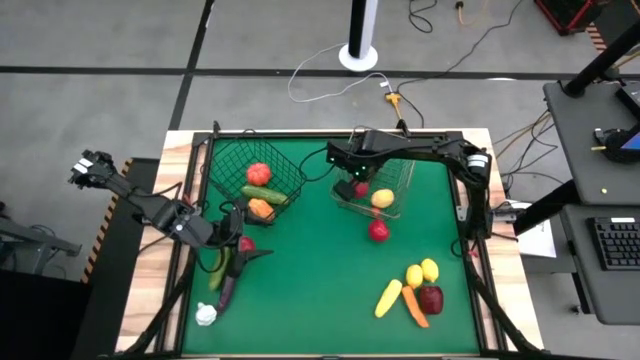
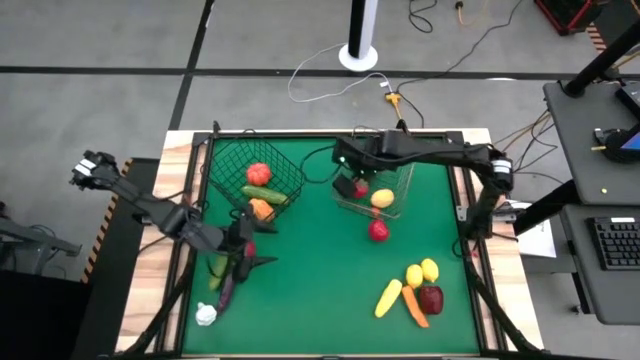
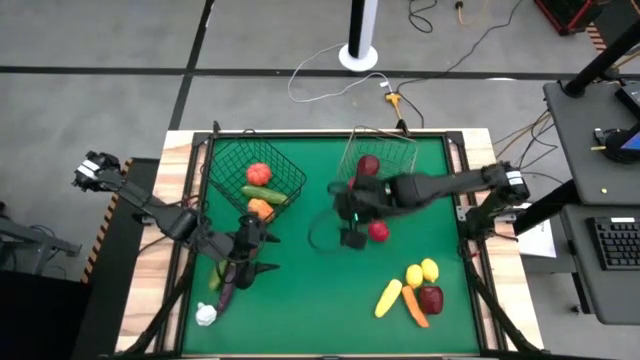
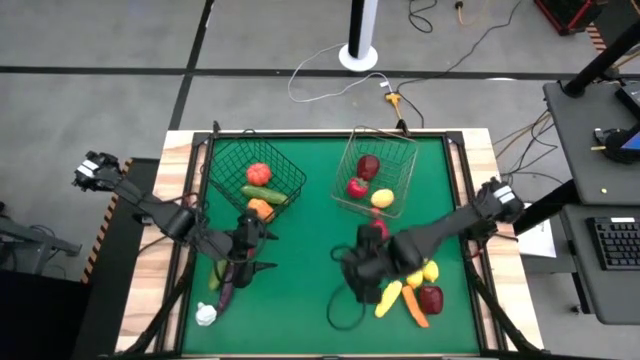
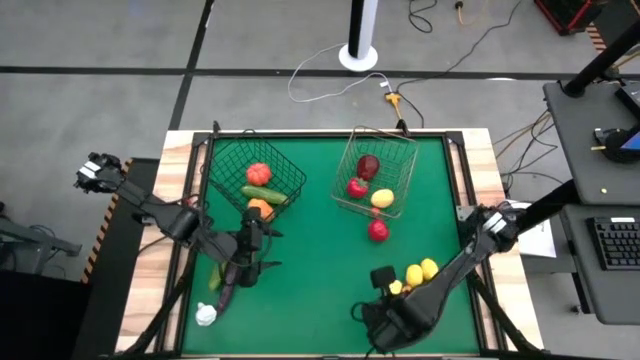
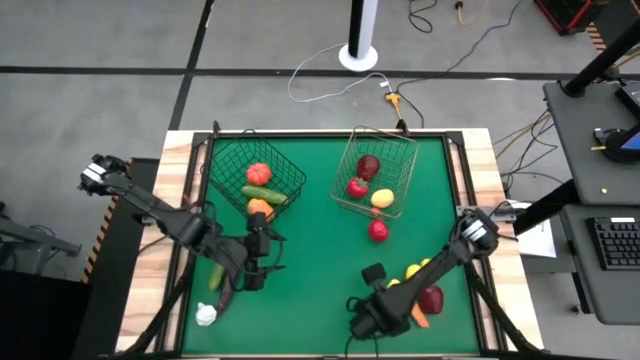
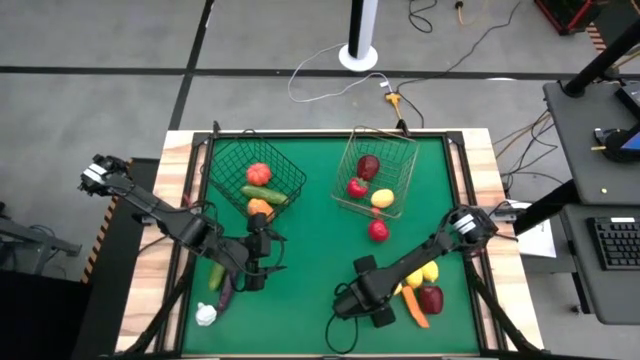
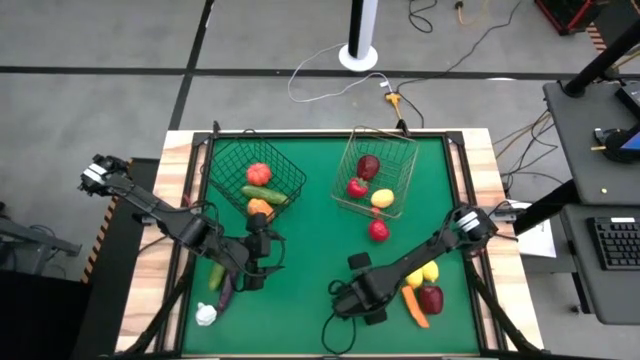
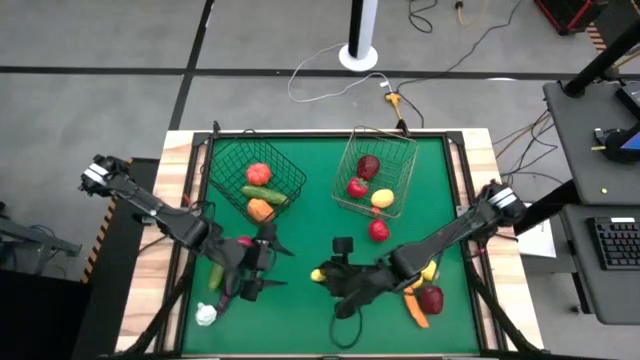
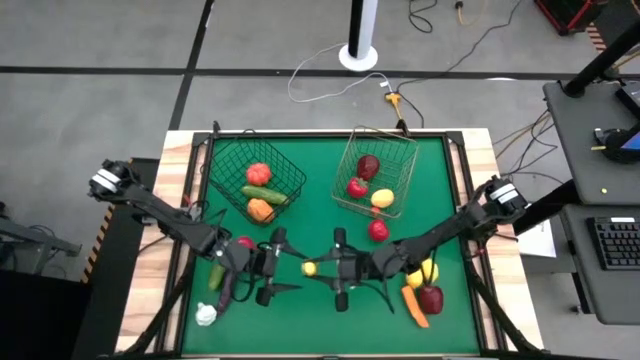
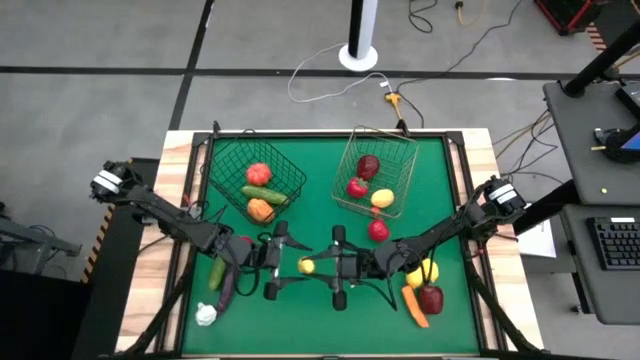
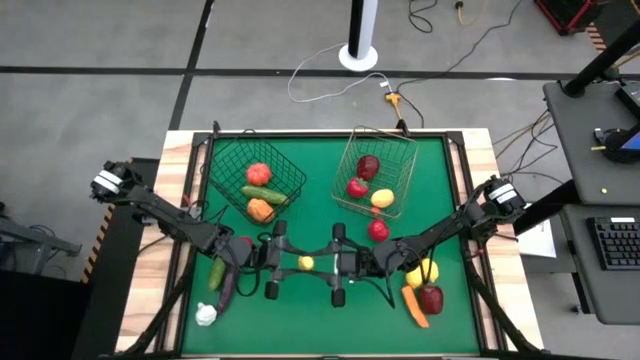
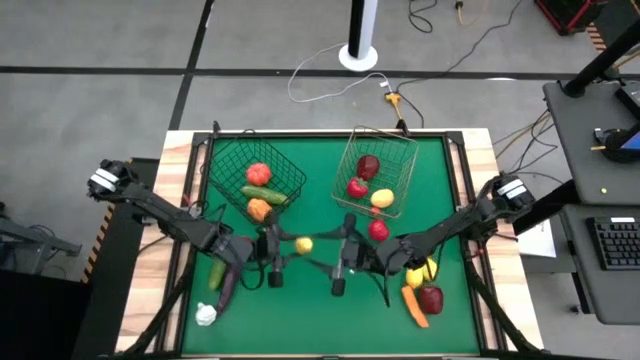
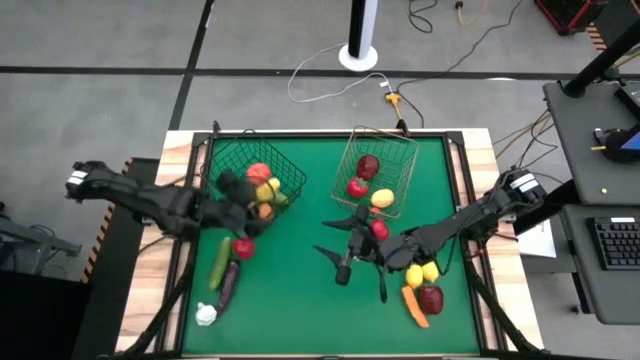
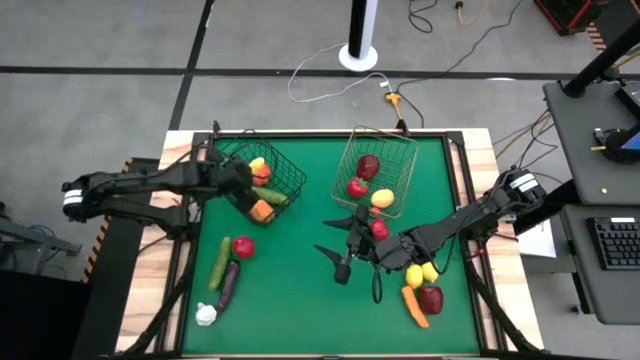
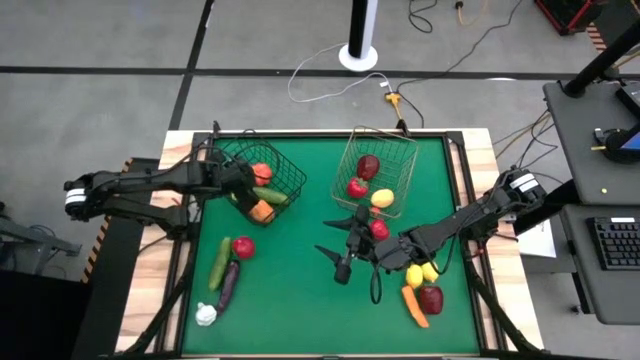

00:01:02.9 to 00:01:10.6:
Task: Sort produce into baskets
Put the yellow corn into the black wire basket

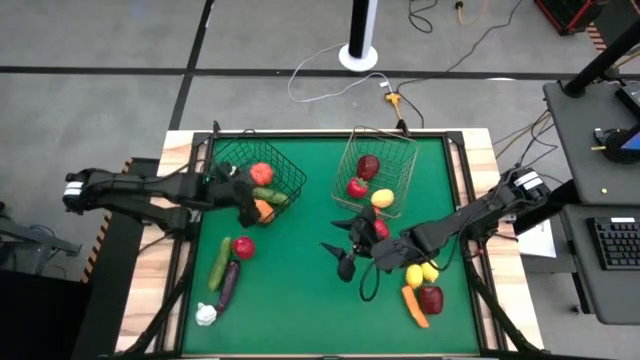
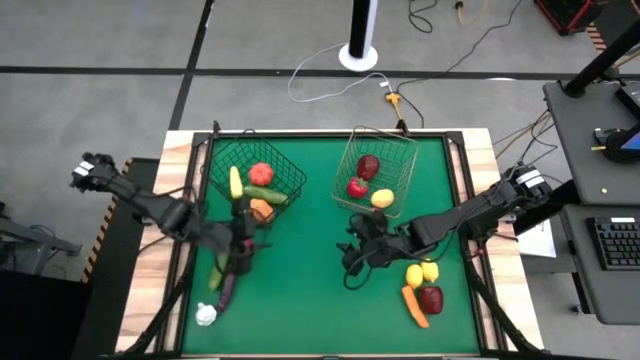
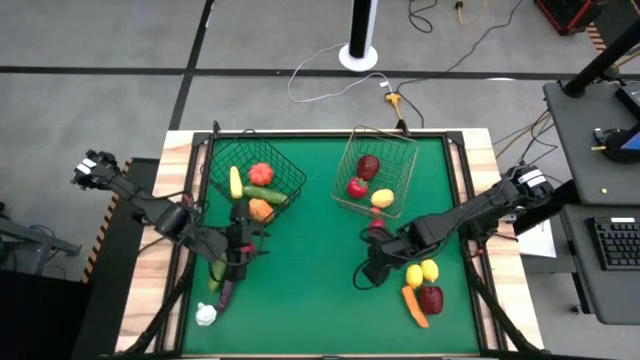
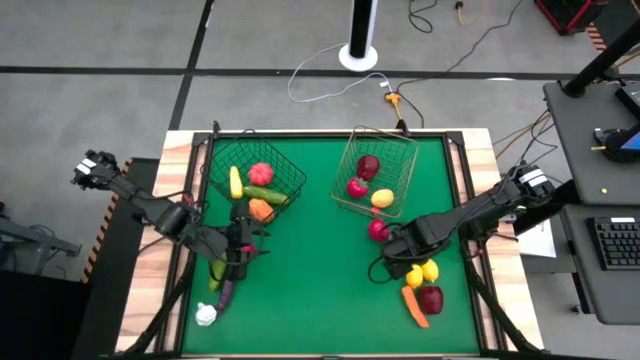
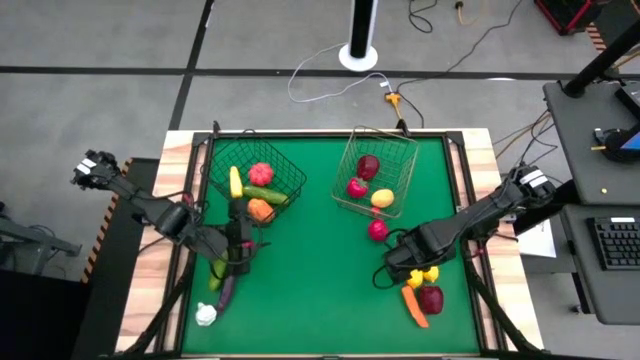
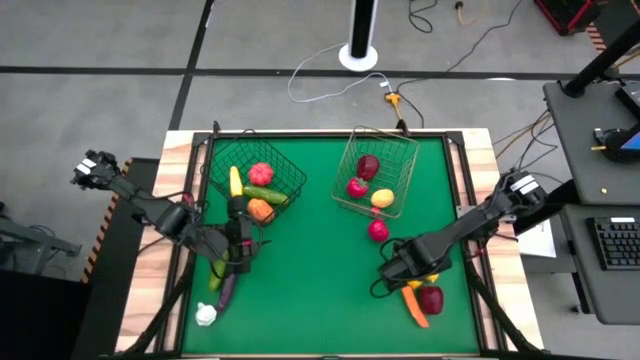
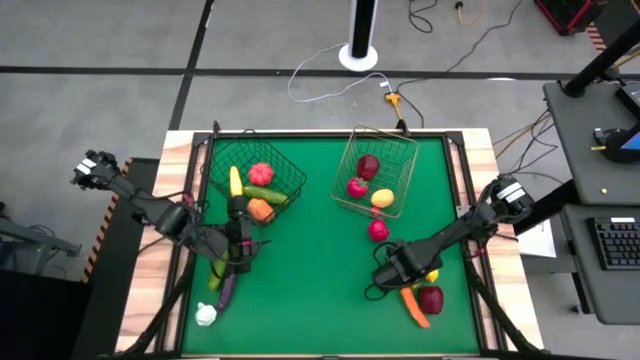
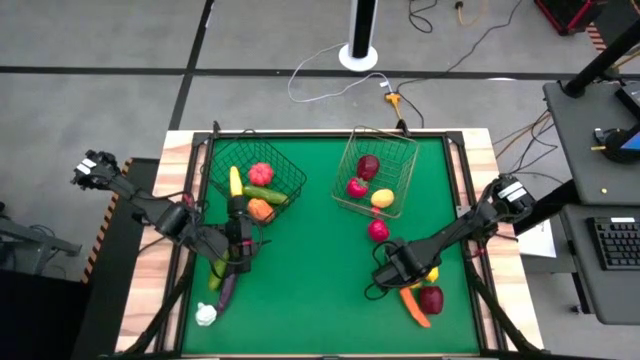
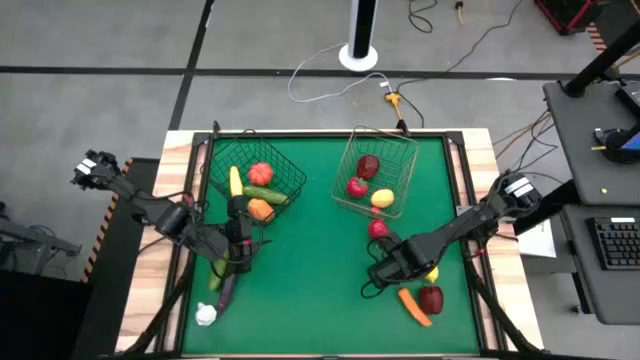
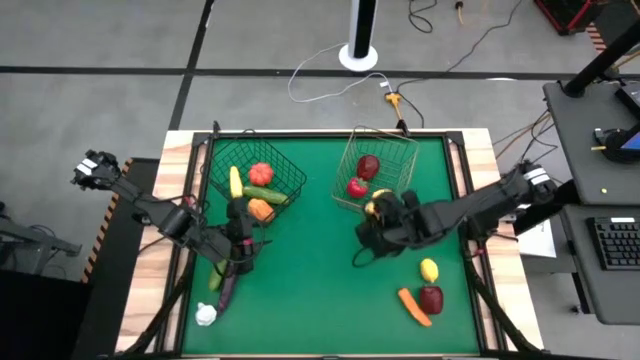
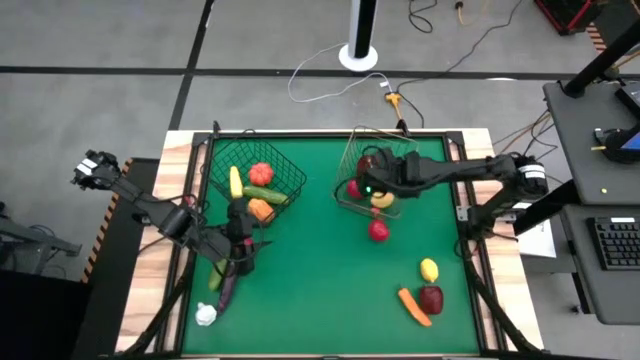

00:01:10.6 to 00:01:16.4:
Put the left yellow lemon into the gold wire basket

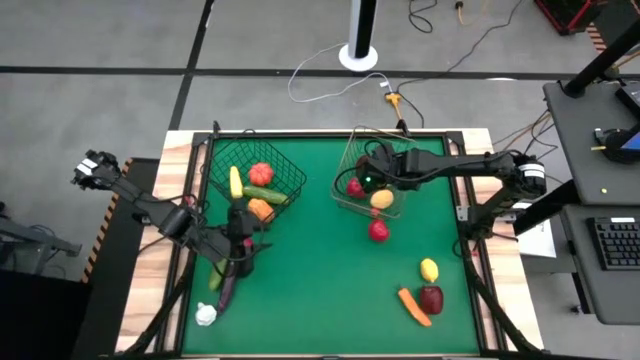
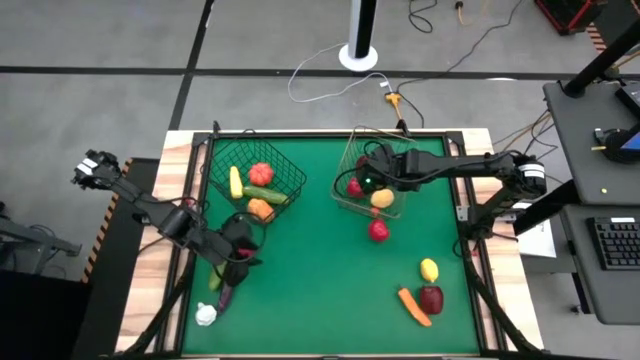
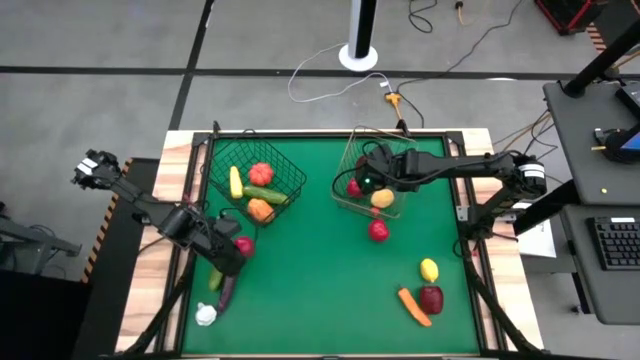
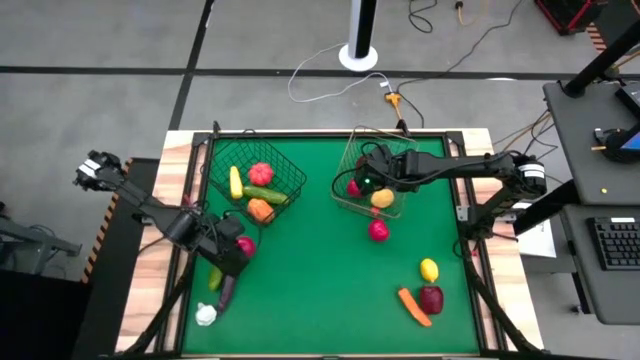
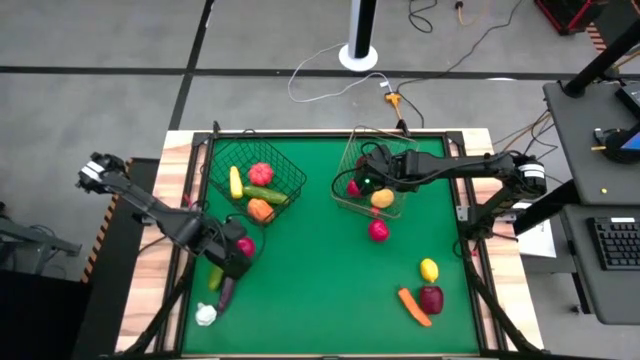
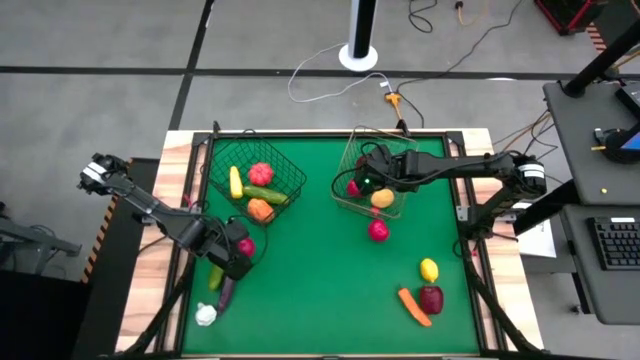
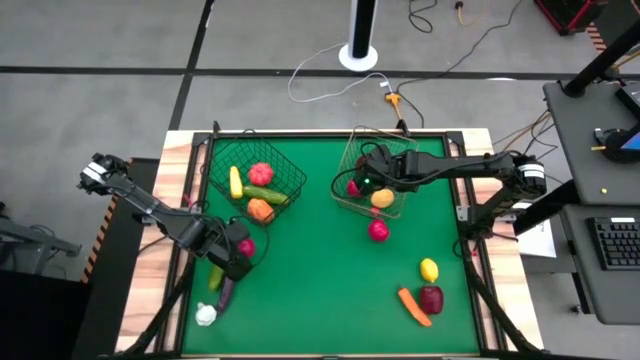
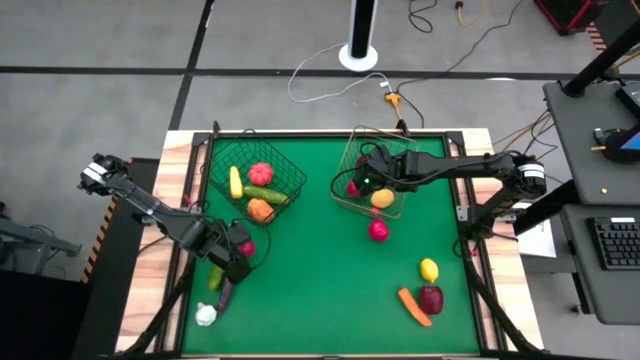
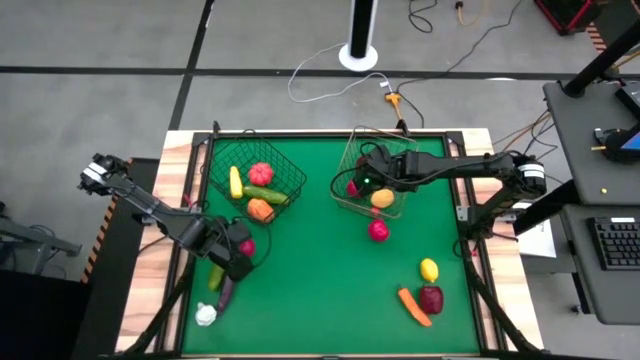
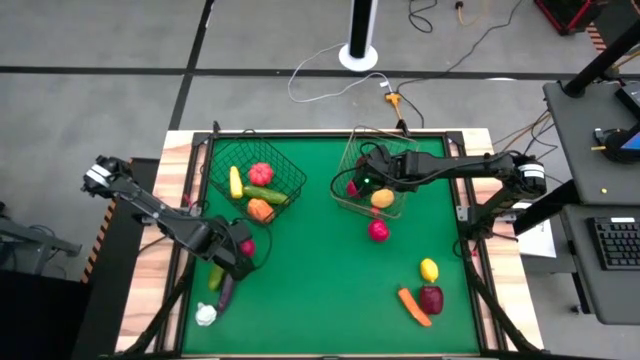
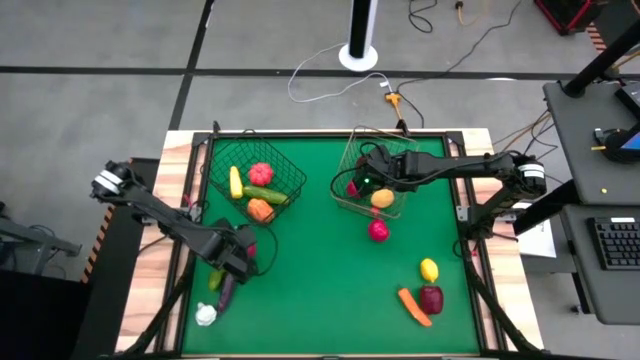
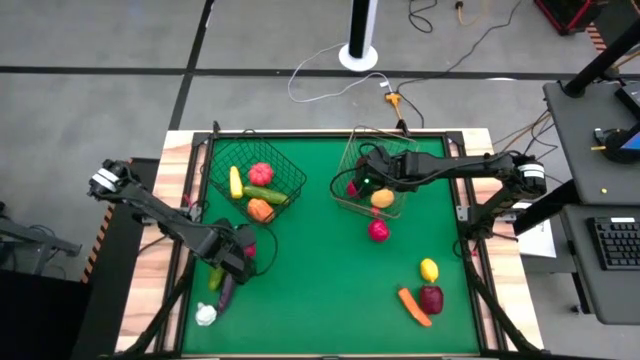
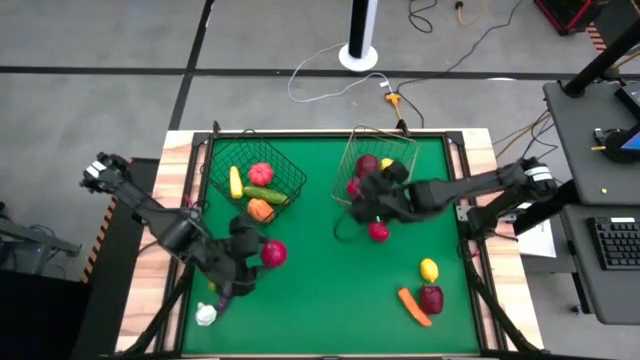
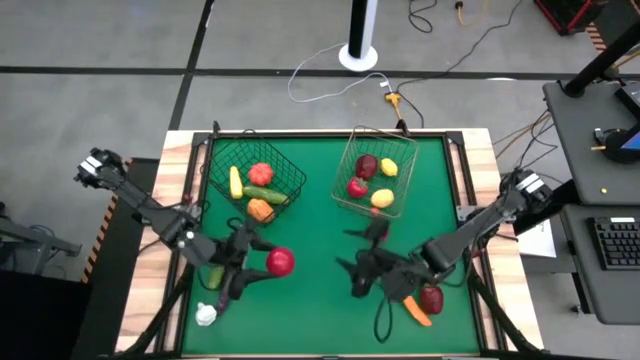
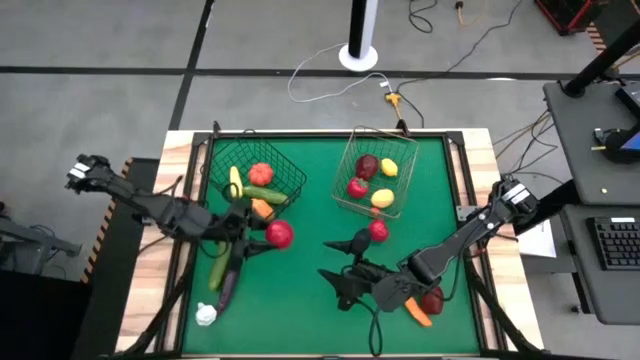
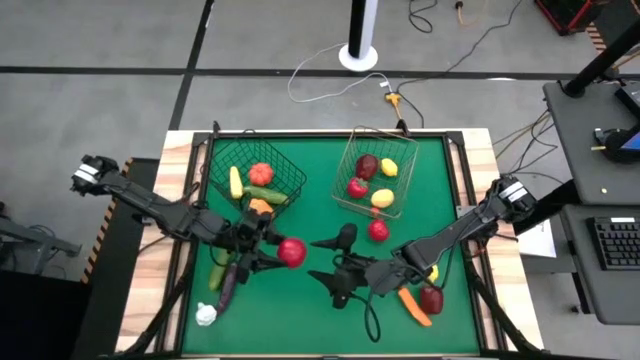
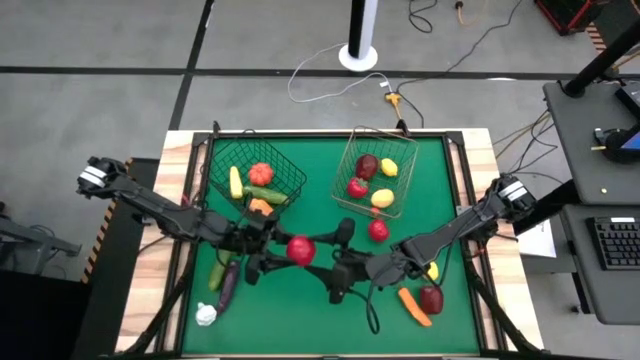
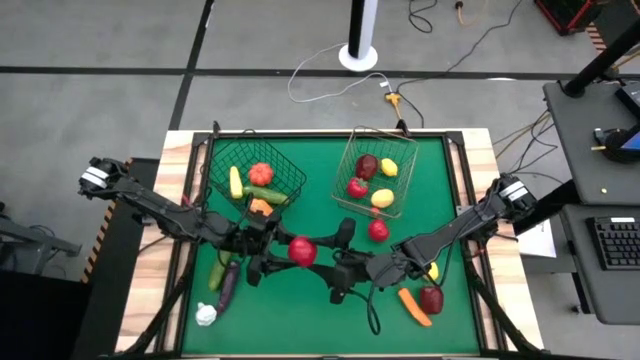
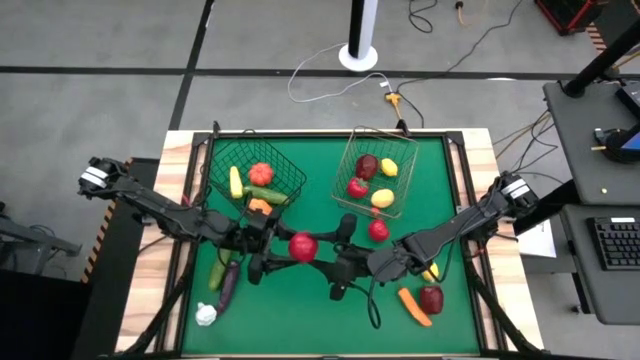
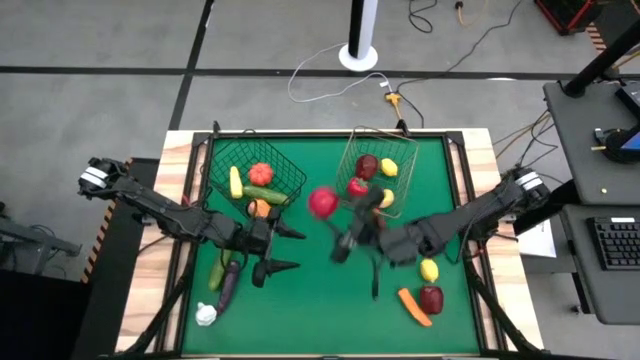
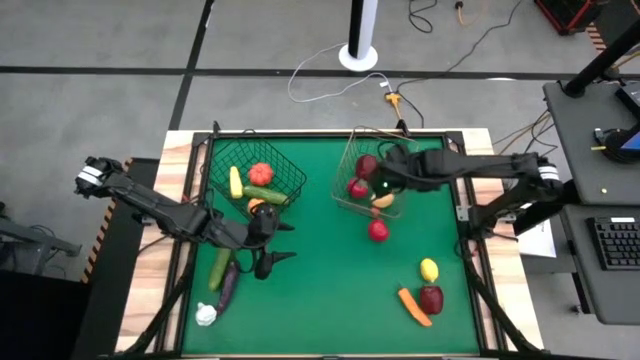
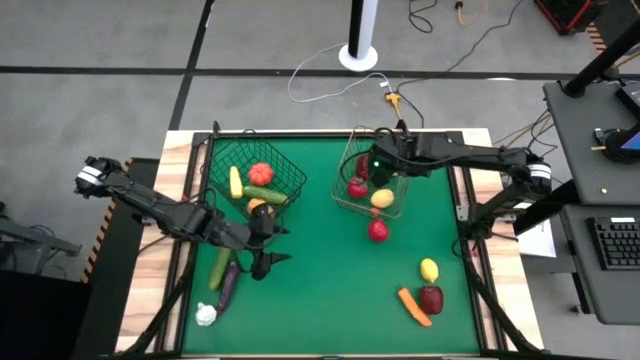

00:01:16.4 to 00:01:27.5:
Put the left red tomato into the gold wire basket
